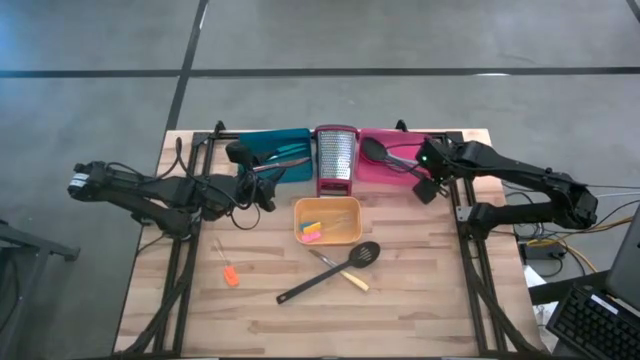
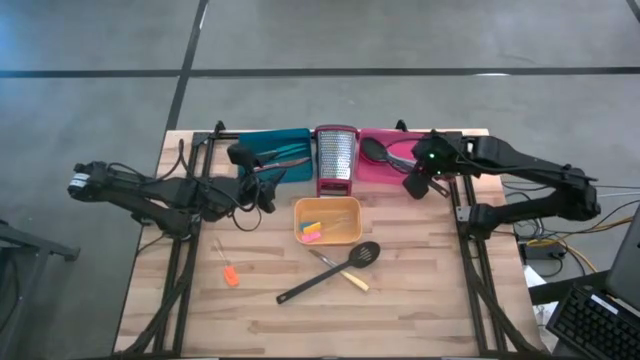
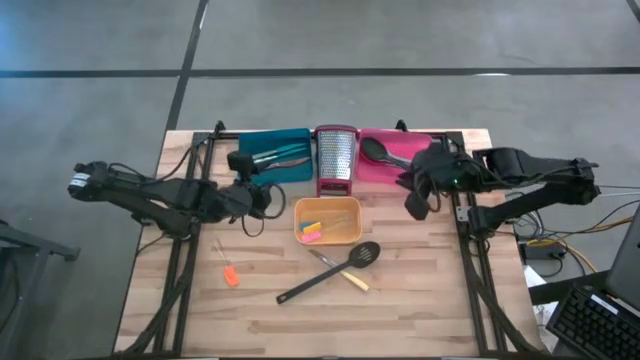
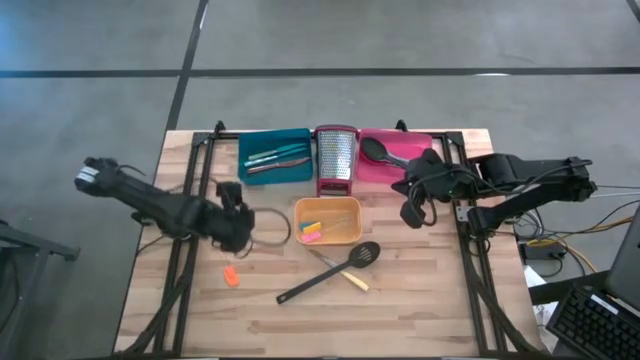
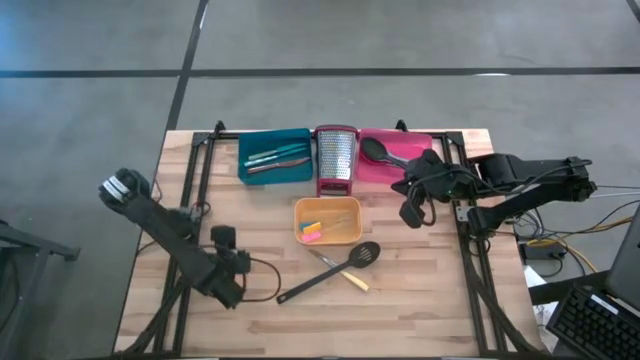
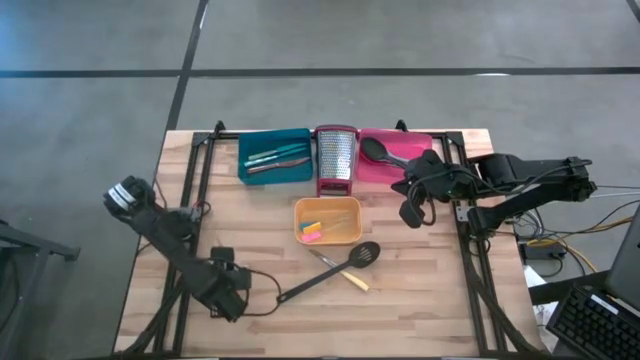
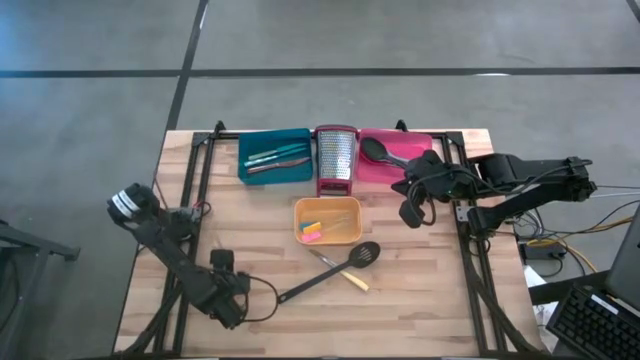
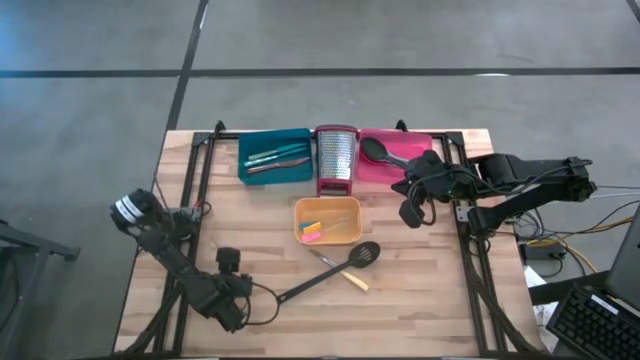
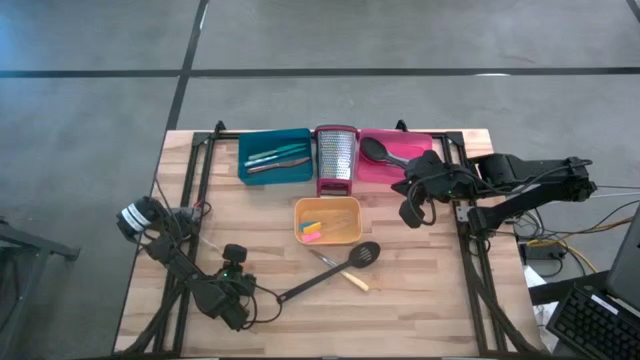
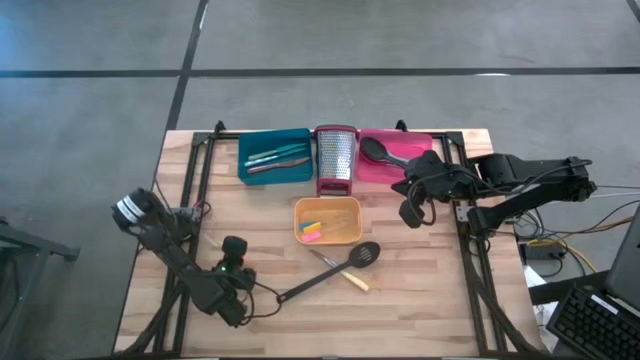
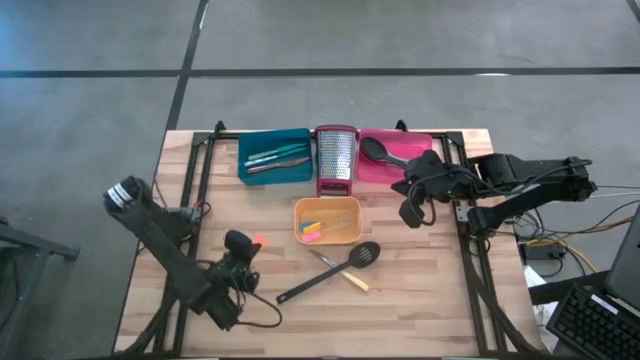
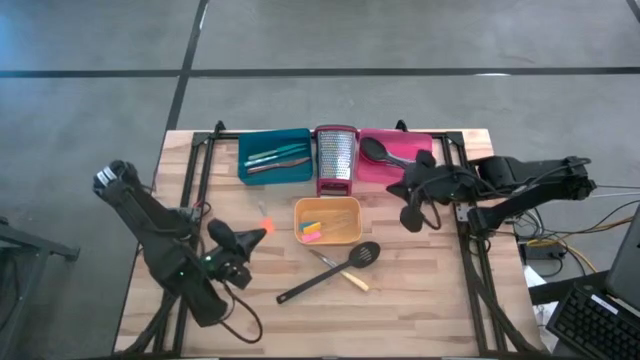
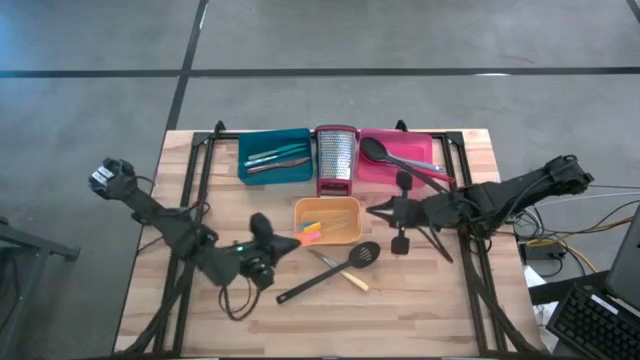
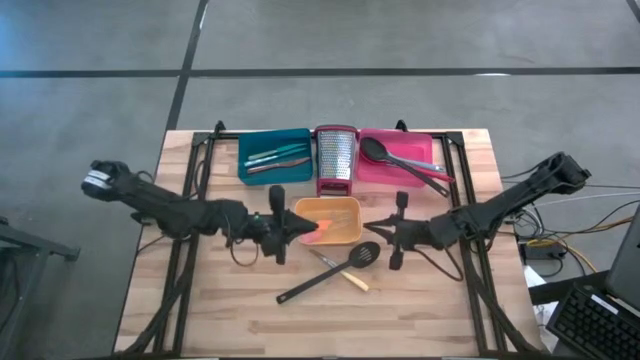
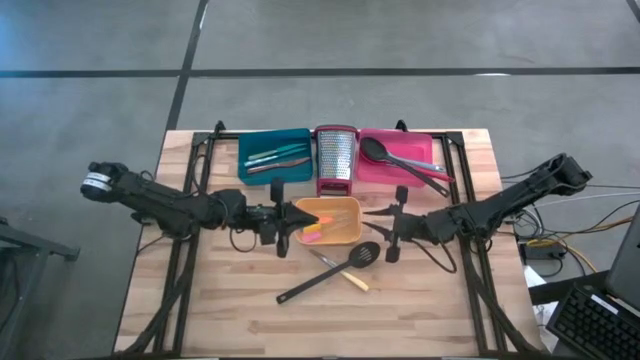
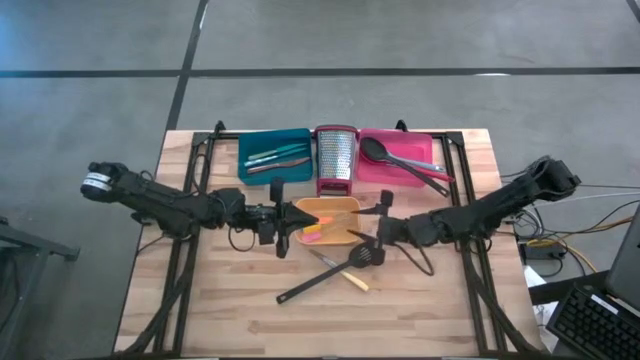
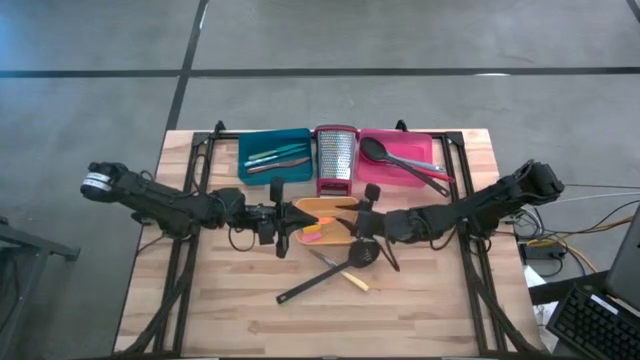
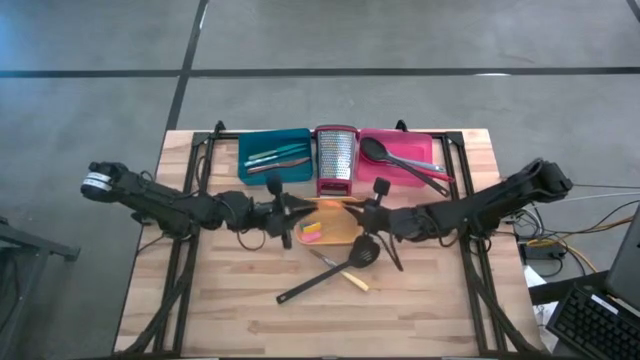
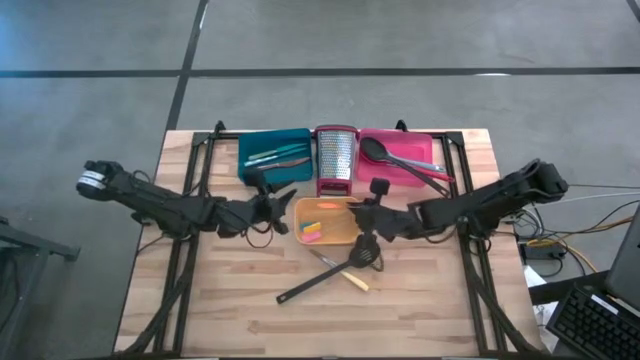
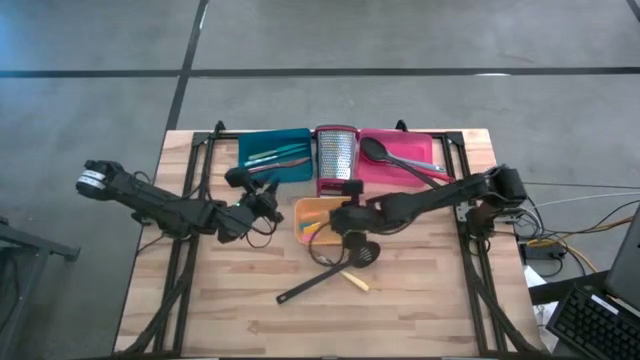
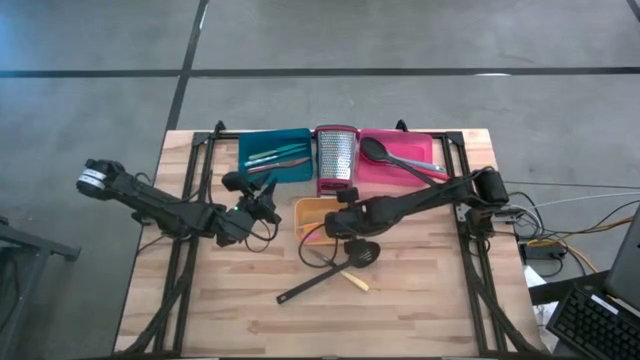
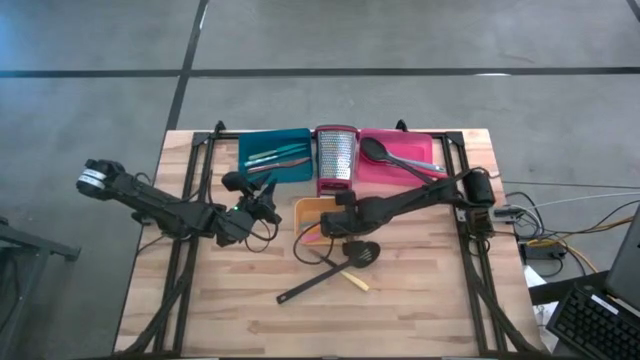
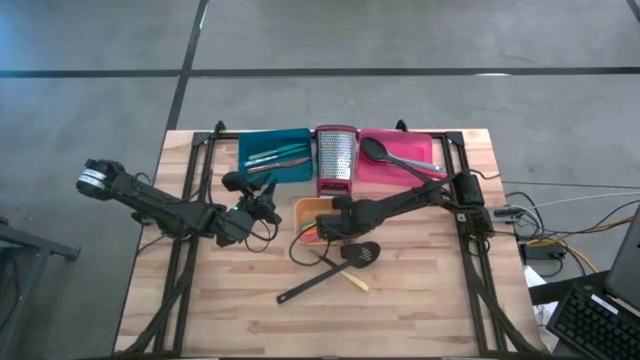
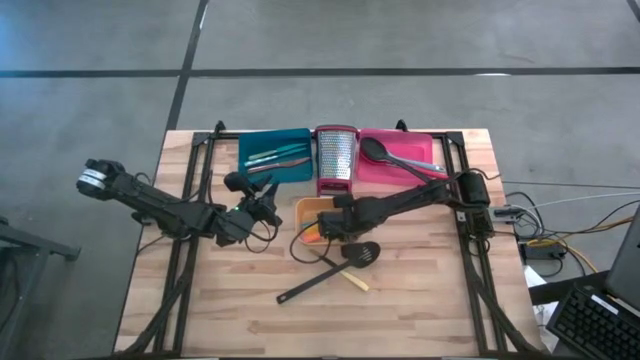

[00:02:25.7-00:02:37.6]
Task: Pick & Place Kitchen Items
Put the orange spatula into the yellow bin

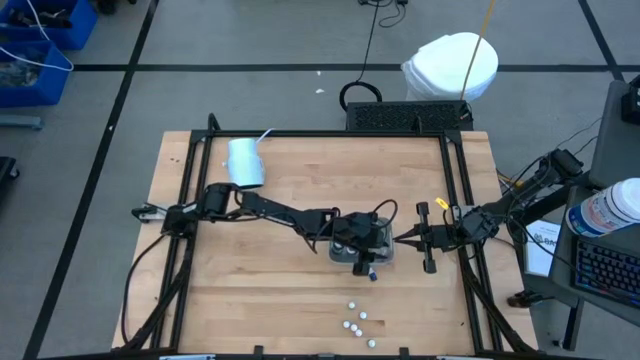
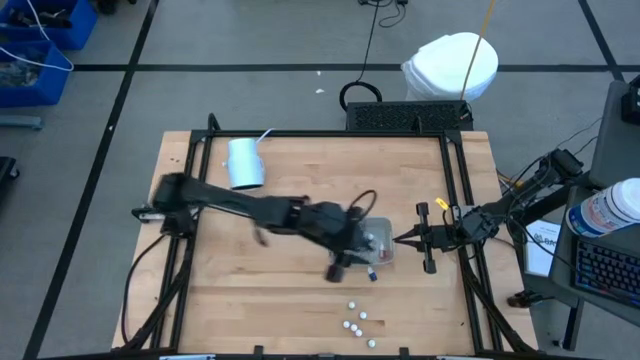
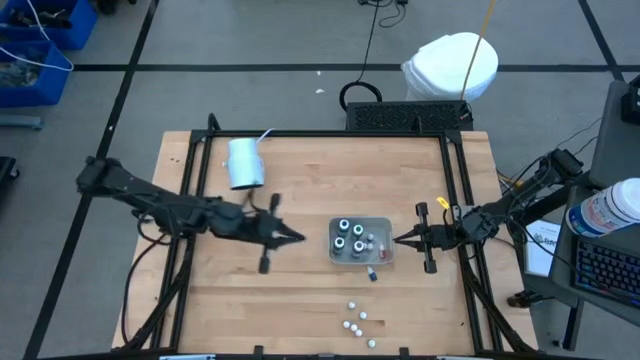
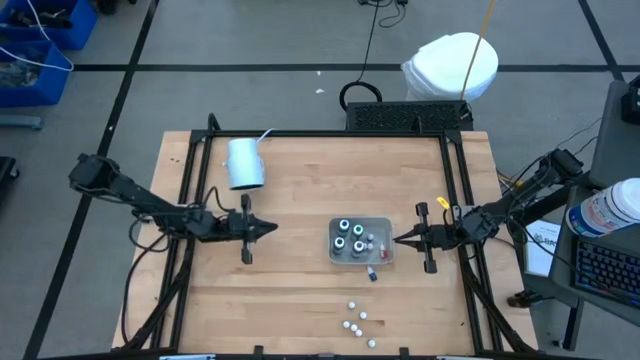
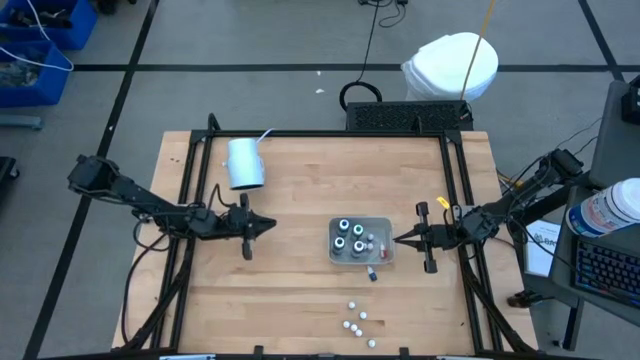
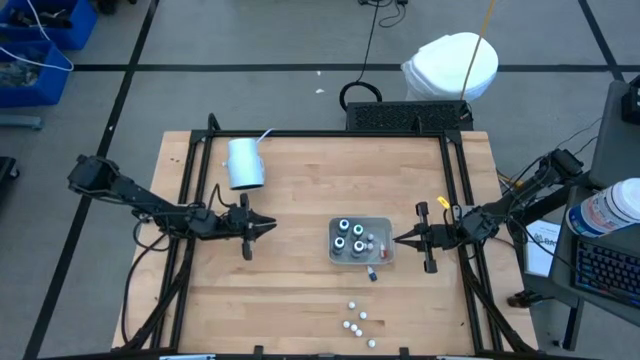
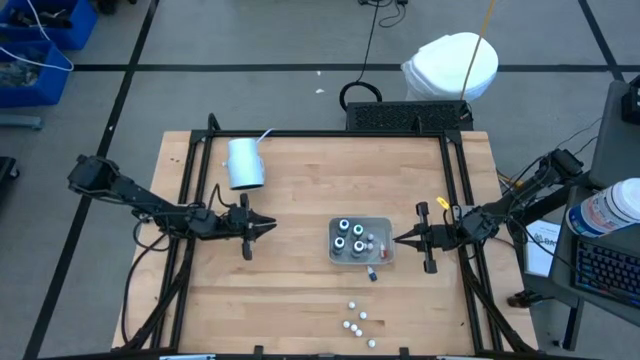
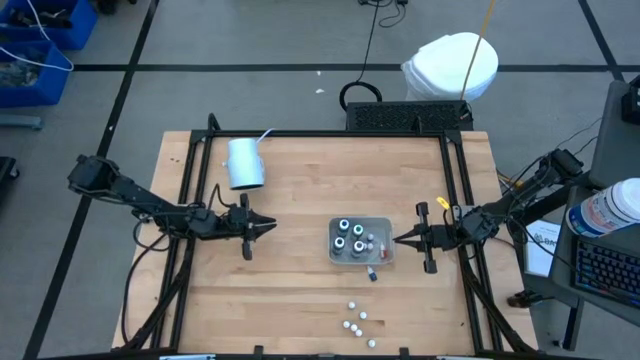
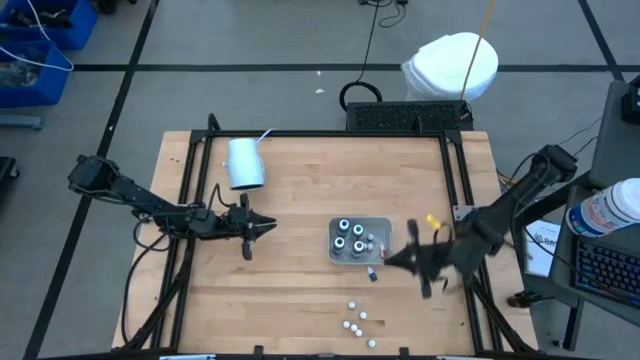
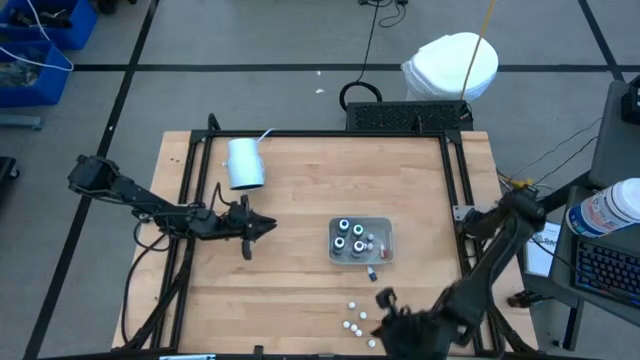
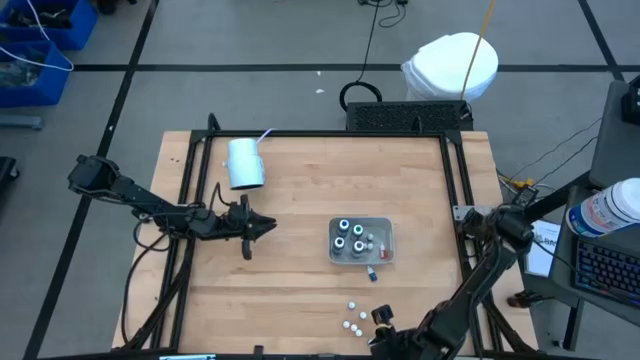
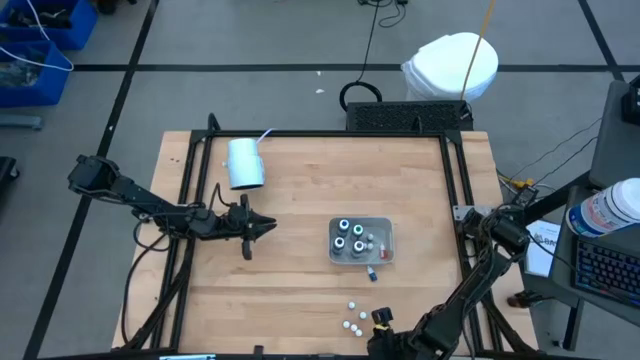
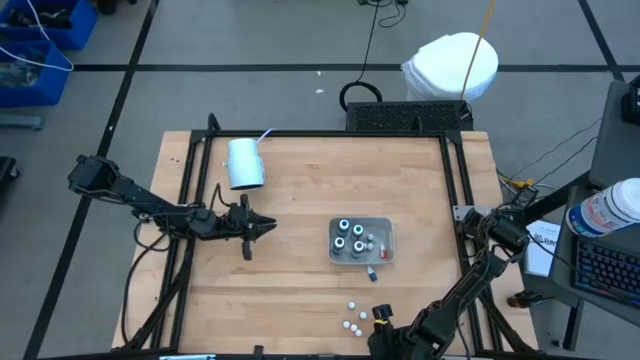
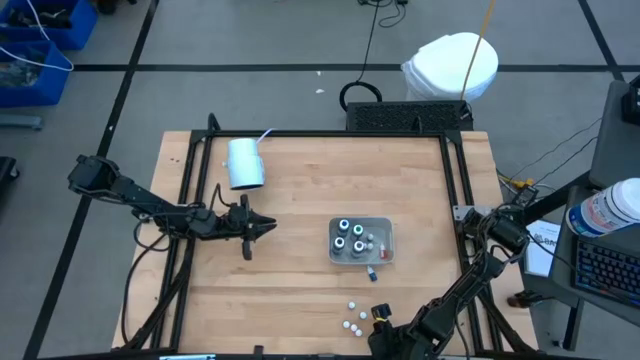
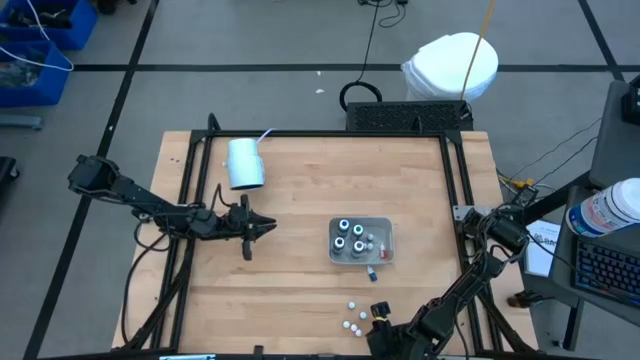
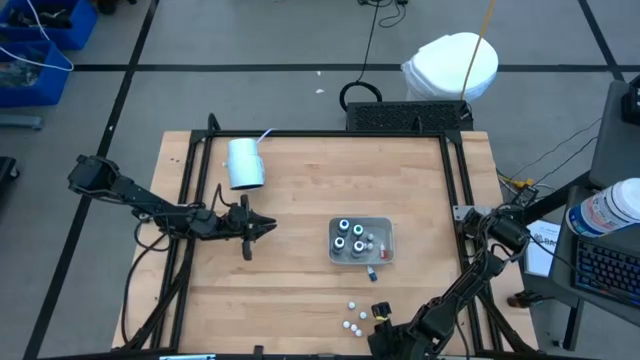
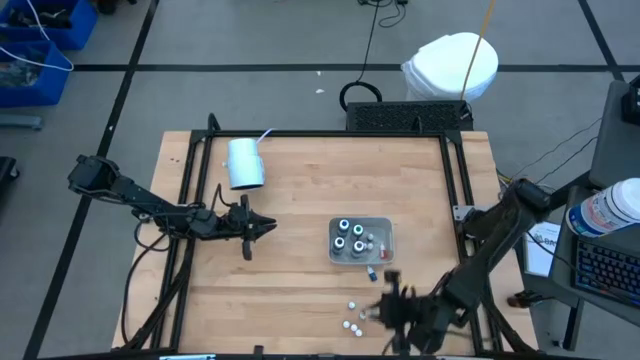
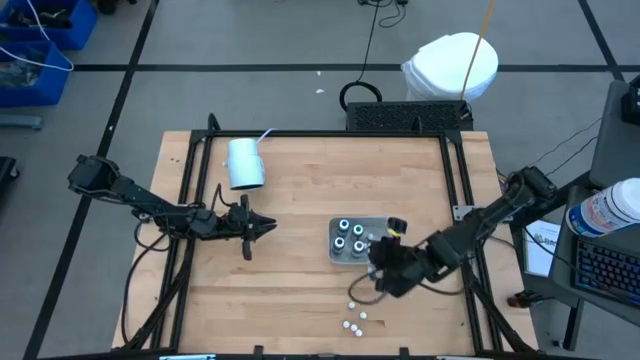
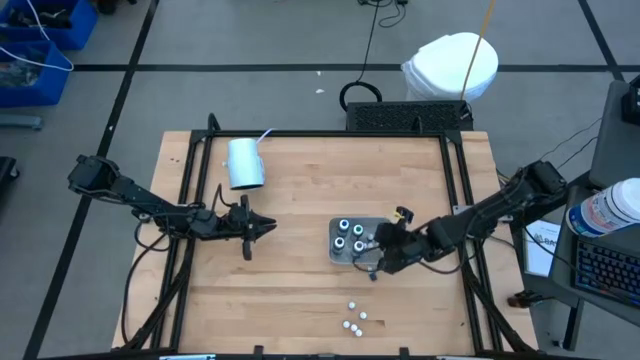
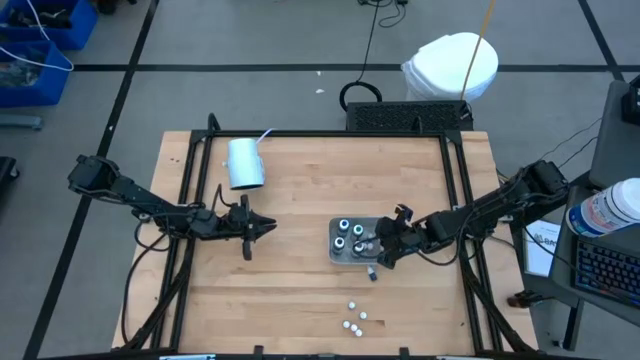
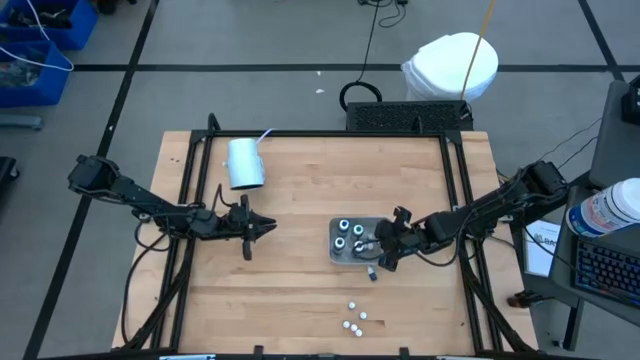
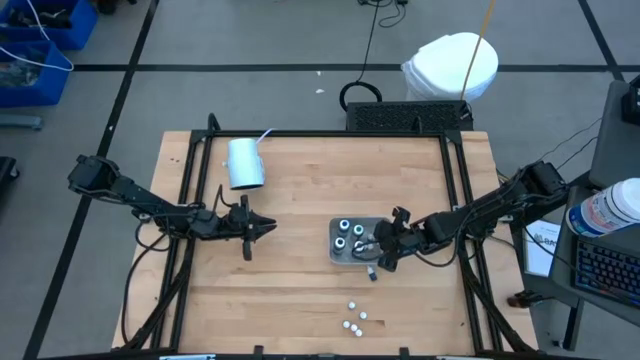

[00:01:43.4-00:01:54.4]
Task: Pick & Place food coloring
Put the small green food coloring bottle into the gray bin
